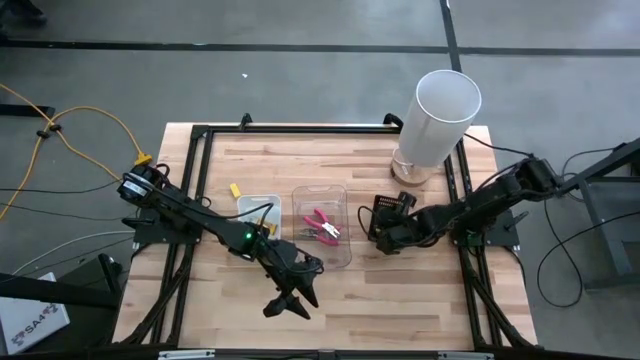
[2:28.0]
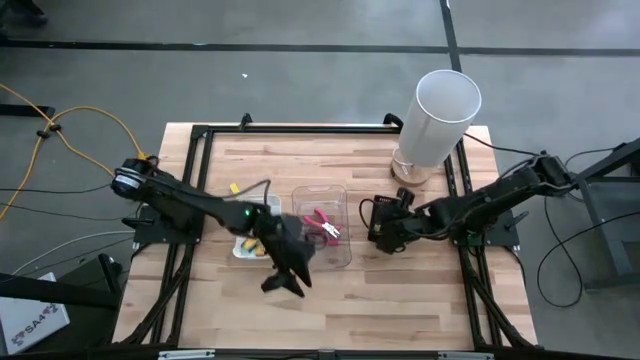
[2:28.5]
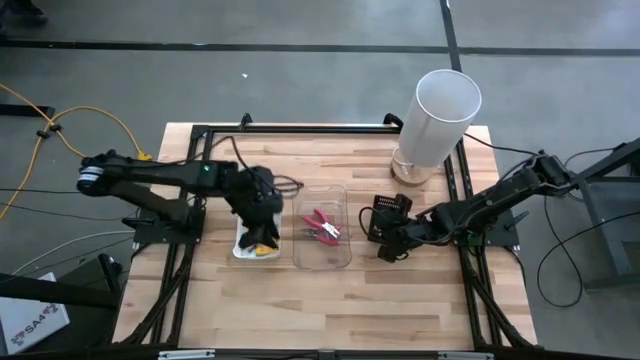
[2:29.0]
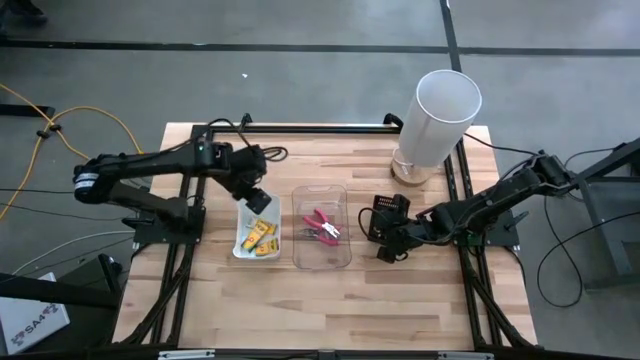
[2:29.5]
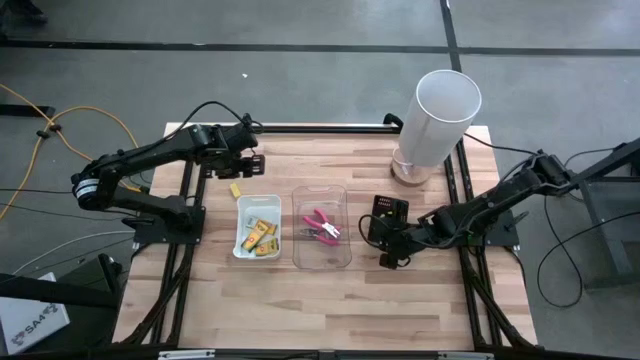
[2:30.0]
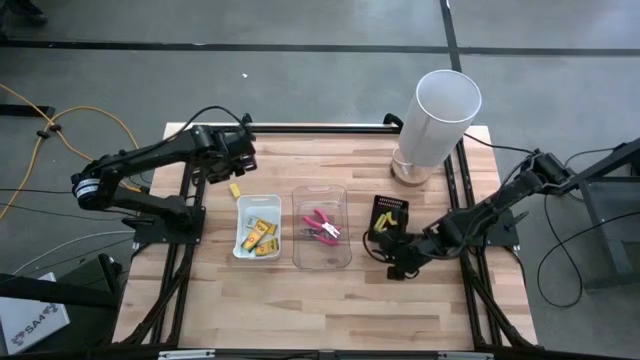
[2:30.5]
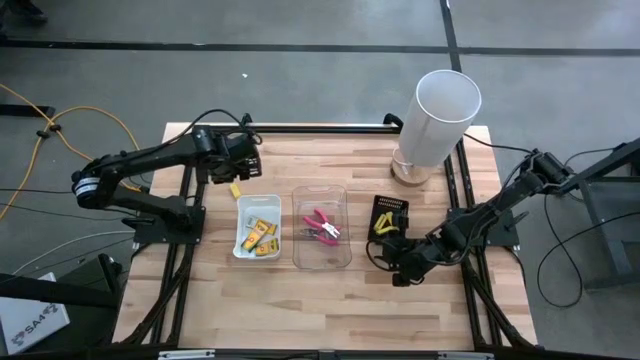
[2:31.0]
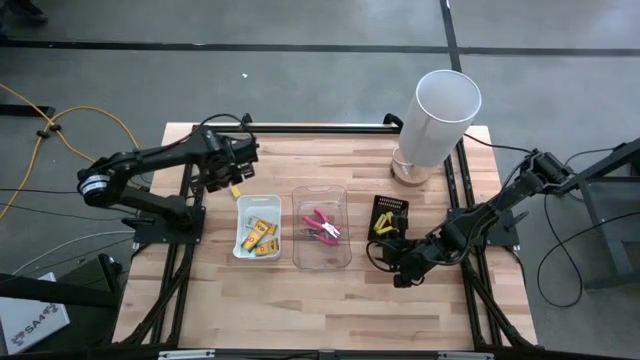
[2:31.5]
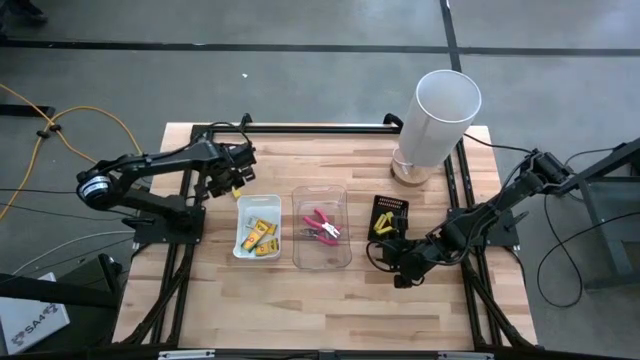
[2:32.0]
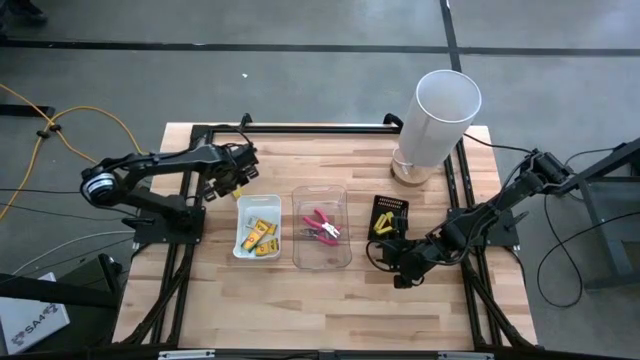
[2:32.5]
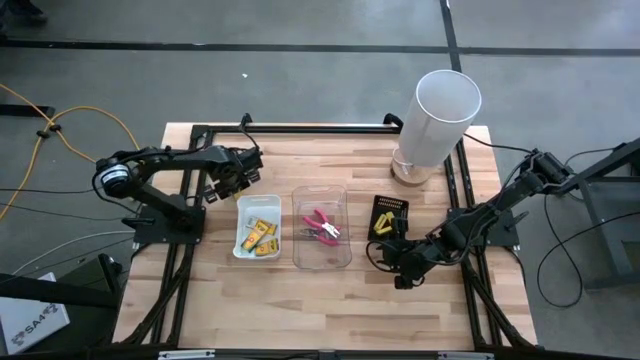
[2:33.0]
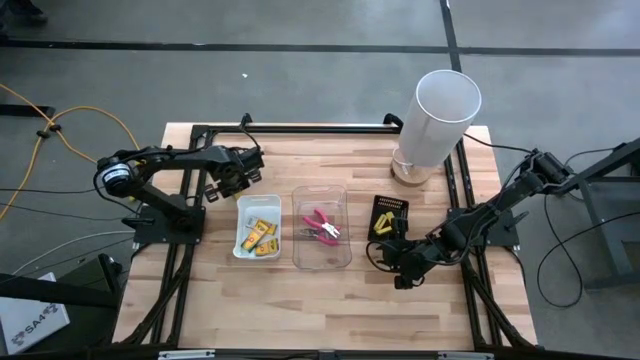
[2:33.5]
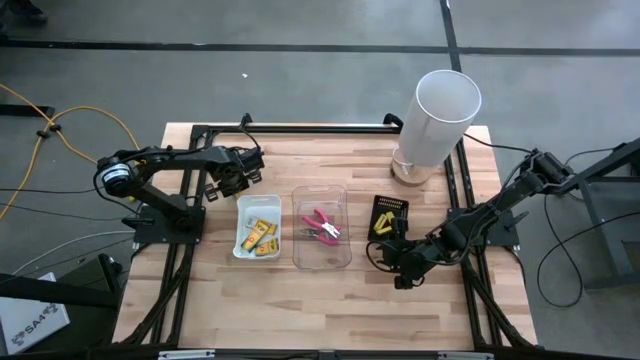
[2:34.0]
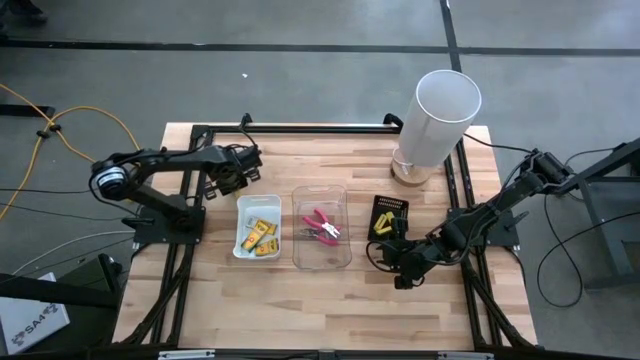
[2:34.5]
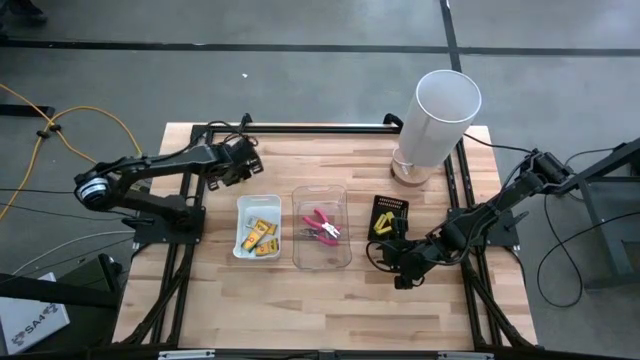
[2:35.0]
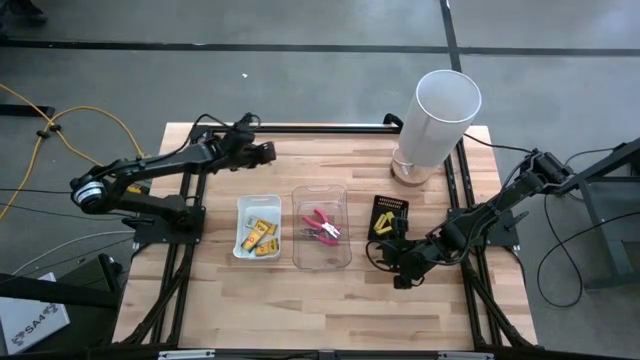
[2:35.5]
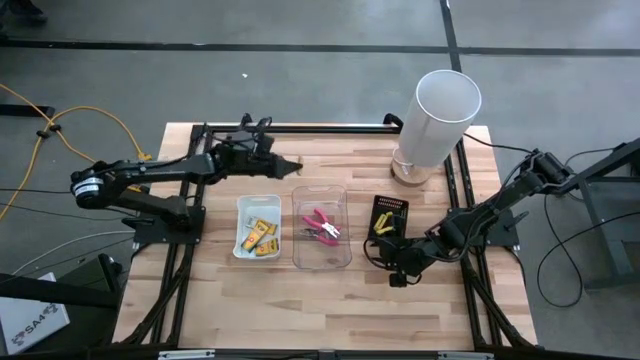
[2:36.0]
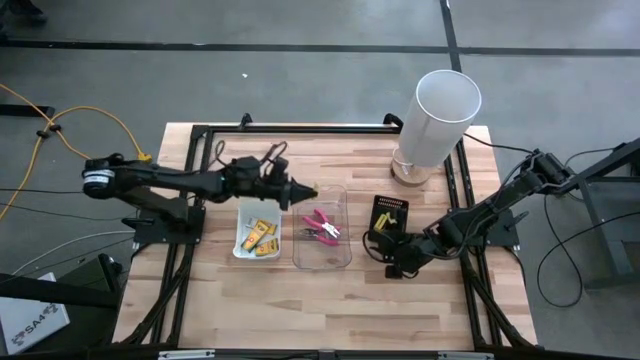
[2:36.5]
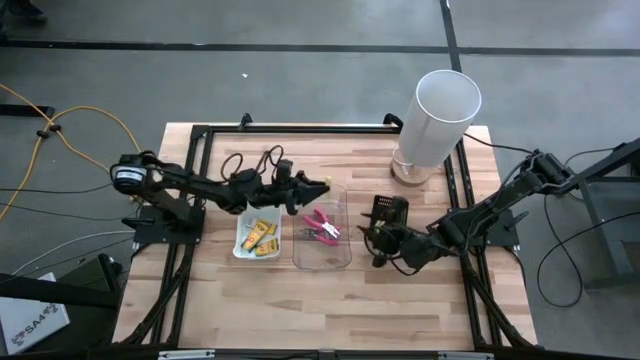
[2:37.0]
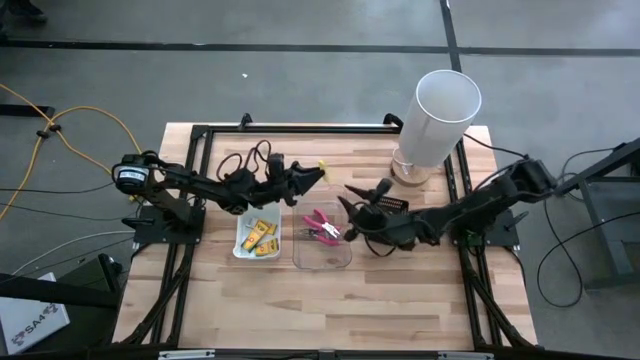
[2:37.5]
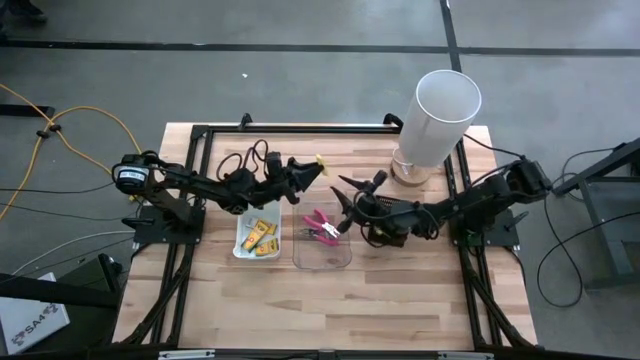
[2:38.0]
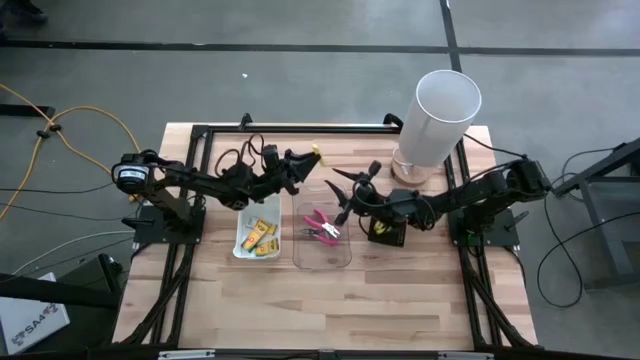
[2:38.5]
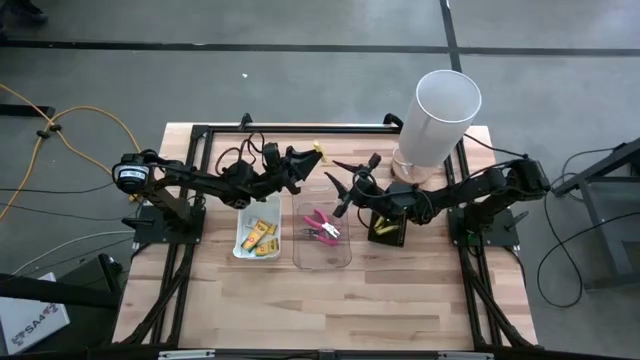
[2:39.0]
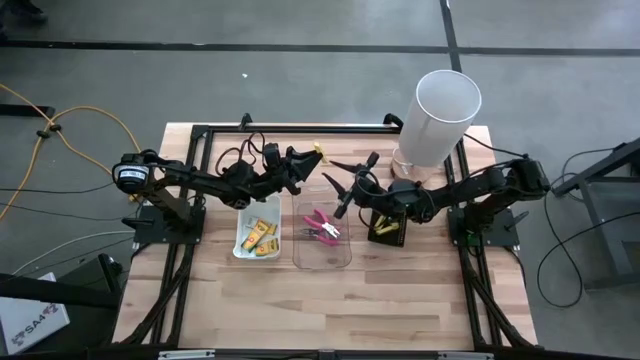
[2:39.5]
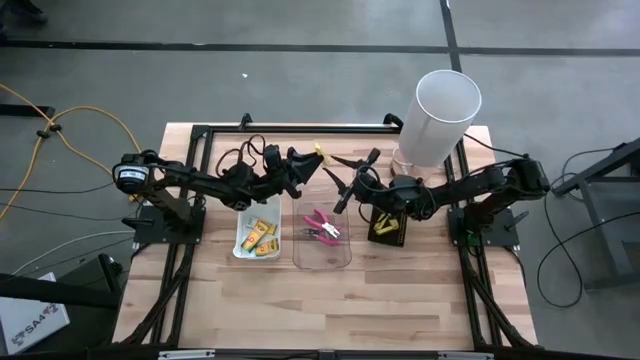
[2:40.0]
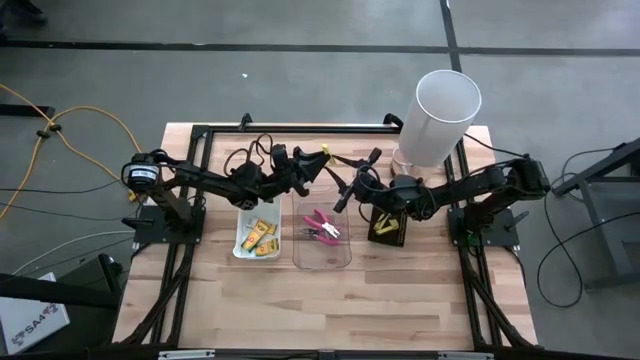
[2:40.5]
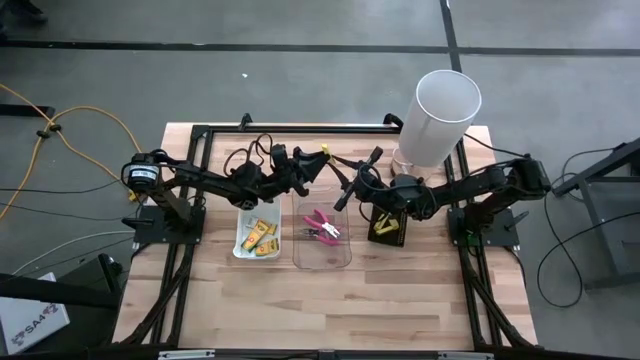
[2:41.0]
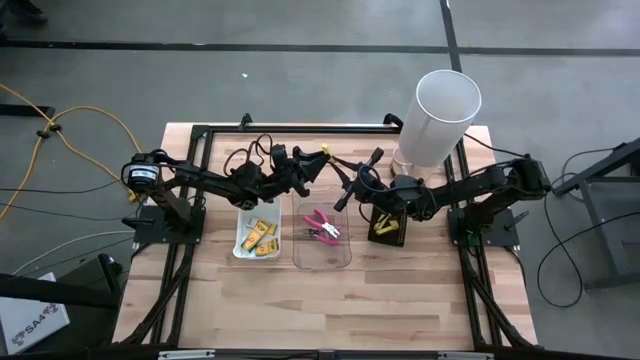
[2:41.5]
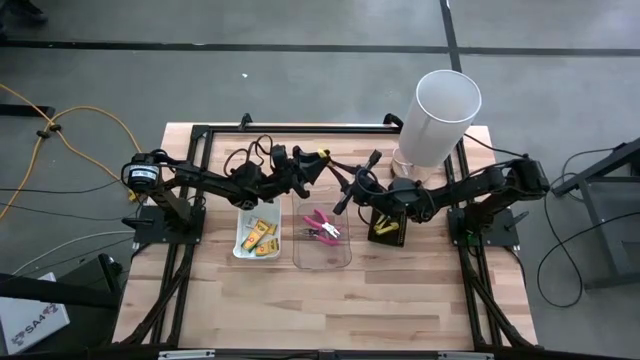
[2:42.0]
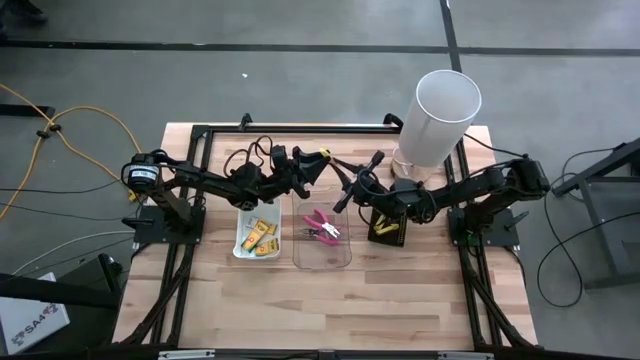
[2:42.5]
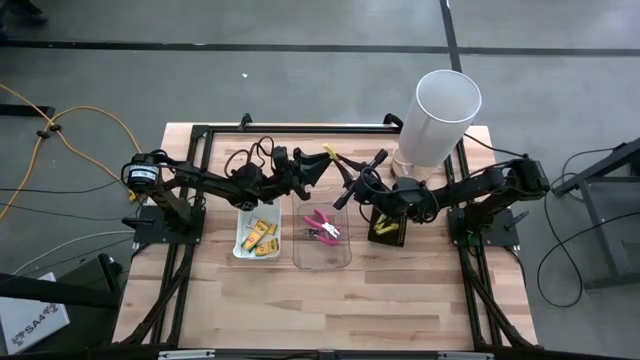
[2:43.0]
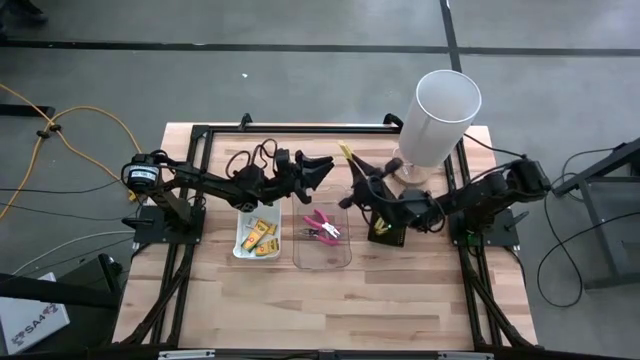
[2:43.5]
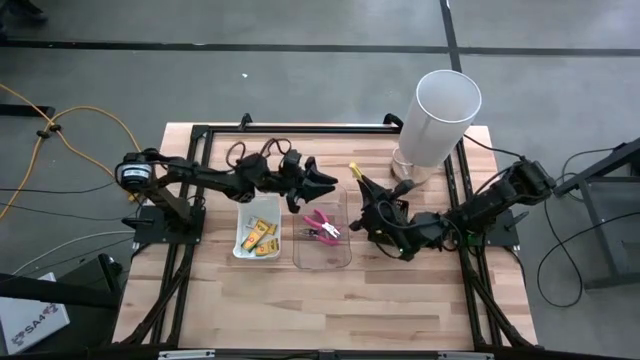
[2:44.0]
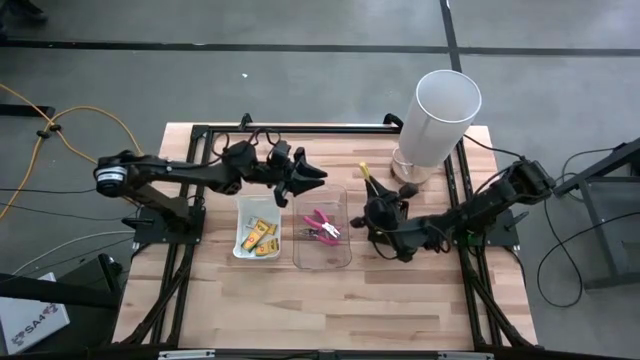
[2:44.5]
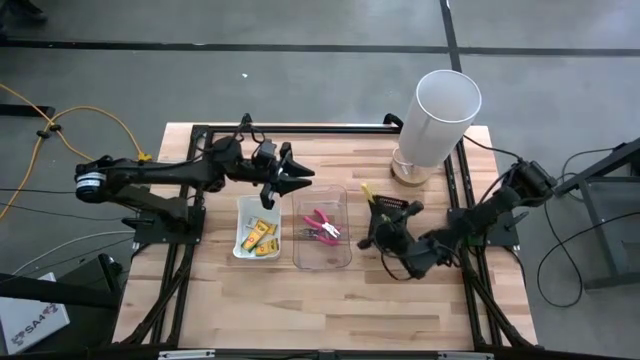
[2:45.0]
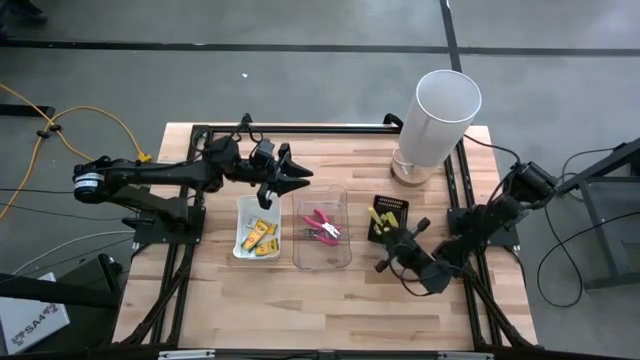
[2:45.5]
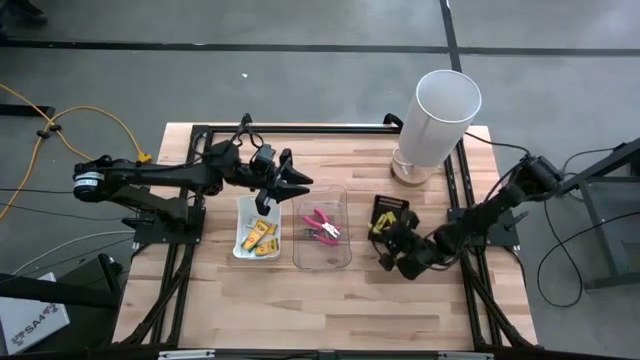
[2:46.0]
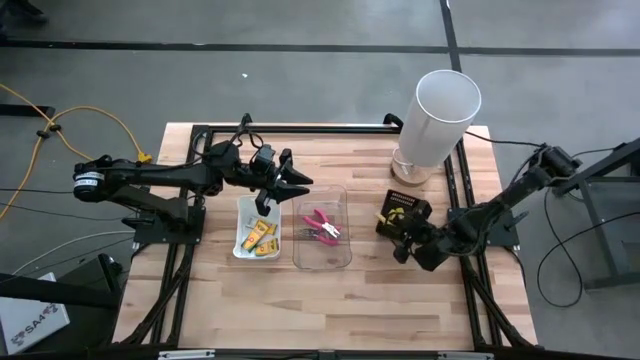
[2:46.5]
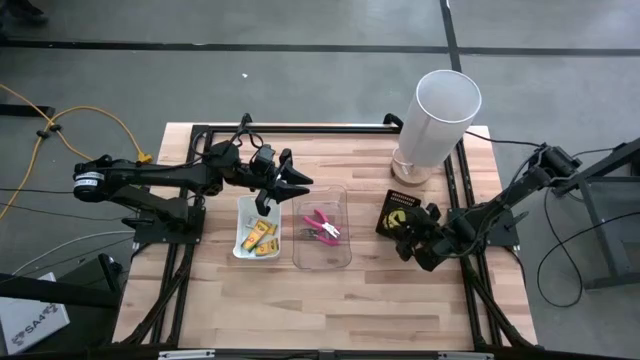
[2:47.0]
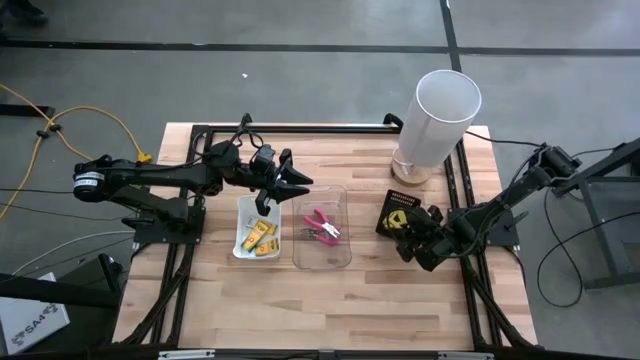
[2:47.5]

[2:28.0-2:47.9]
Task: Pick & Place School Supplies
Put the yellow eraser into the black basket

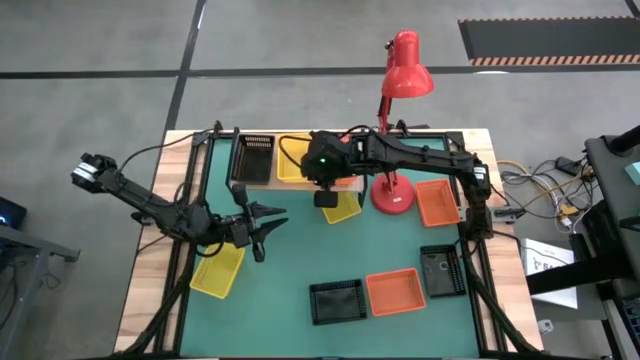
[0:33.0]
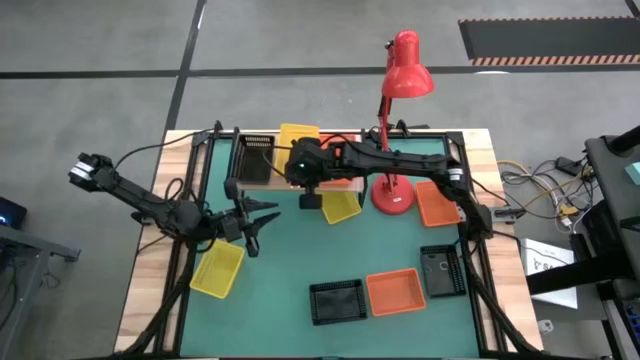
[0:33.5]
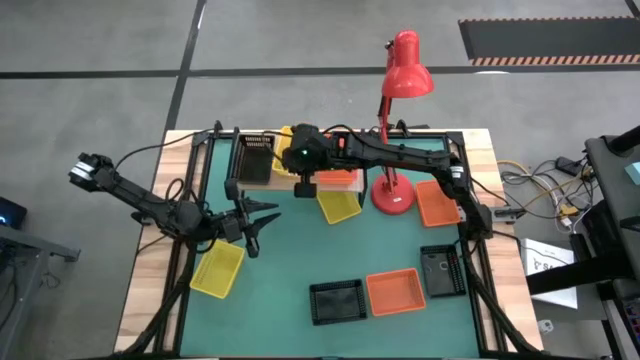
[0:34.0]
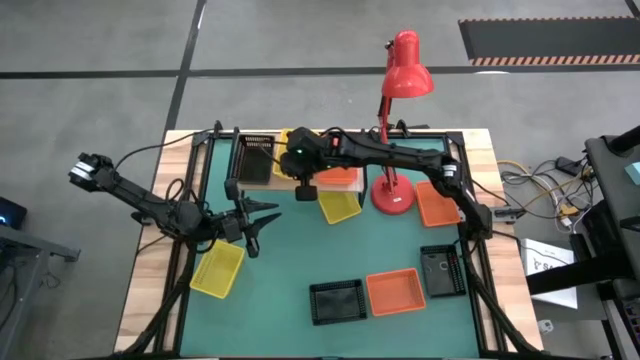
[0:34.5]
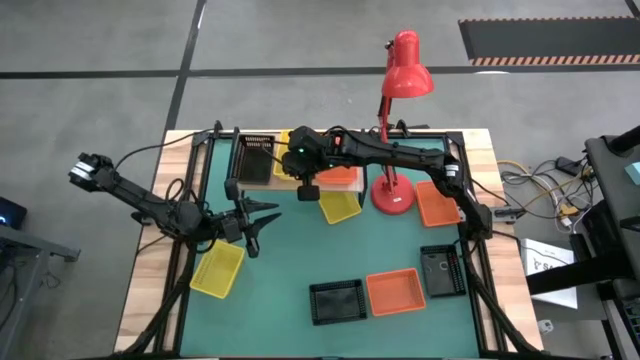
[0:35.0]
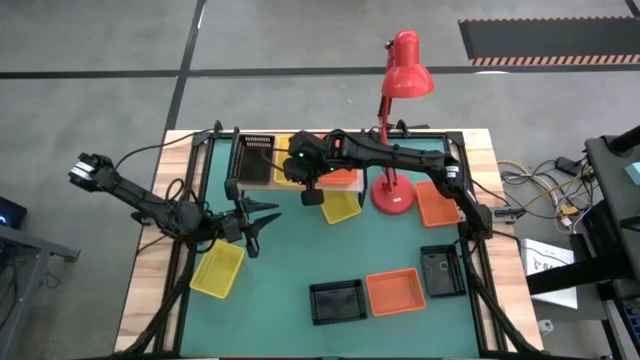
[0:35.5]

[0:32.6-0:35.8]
Task: Stack baskets on shelf by color
Adjust the yellow bin on the shelf
